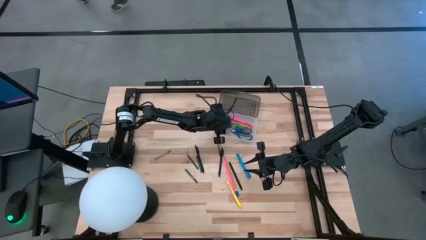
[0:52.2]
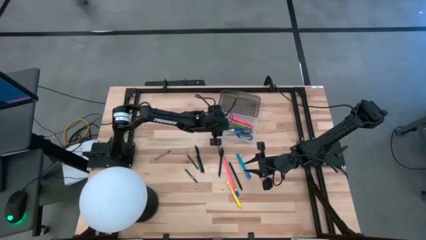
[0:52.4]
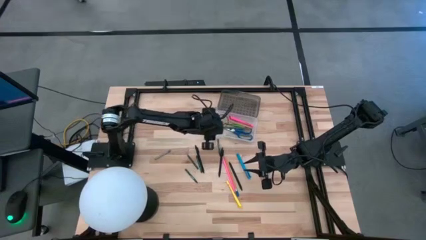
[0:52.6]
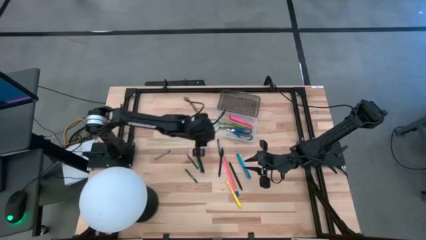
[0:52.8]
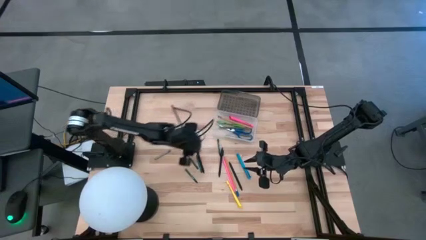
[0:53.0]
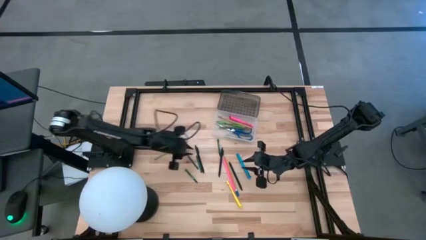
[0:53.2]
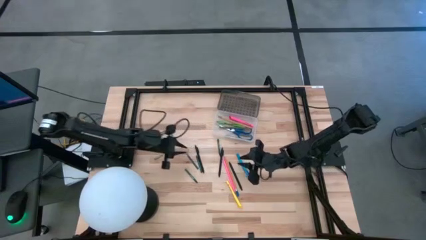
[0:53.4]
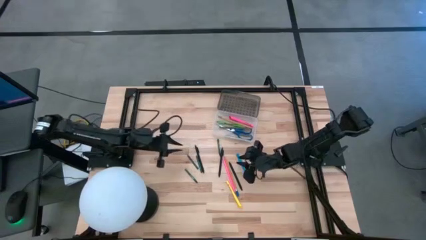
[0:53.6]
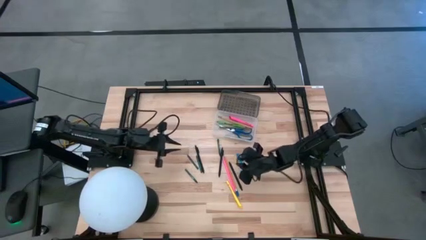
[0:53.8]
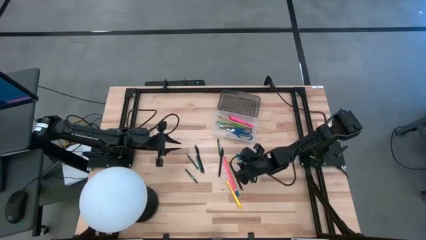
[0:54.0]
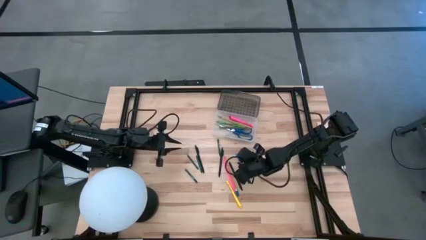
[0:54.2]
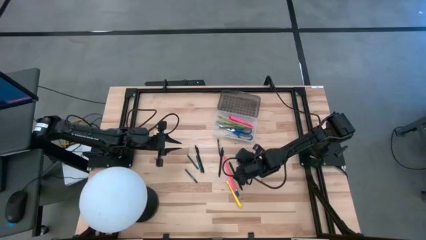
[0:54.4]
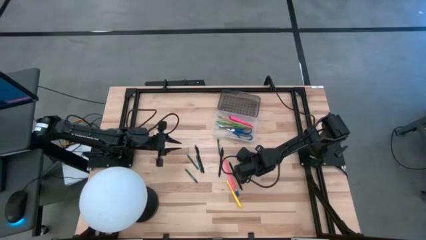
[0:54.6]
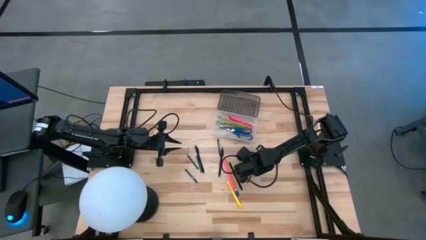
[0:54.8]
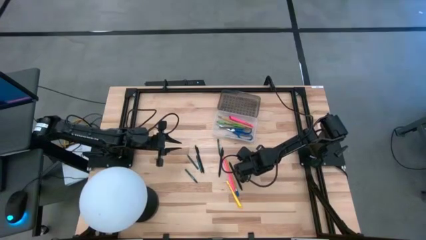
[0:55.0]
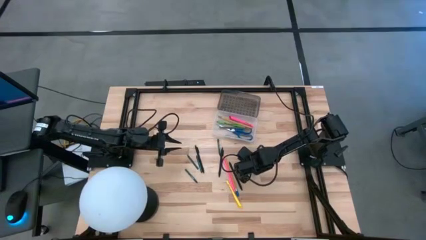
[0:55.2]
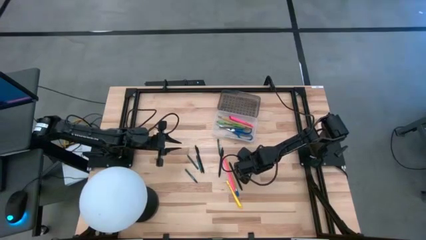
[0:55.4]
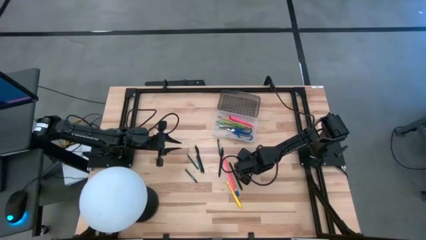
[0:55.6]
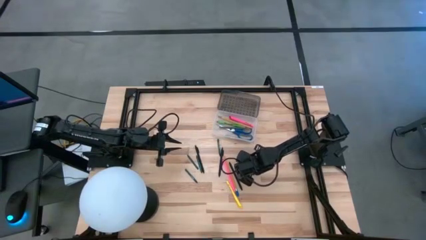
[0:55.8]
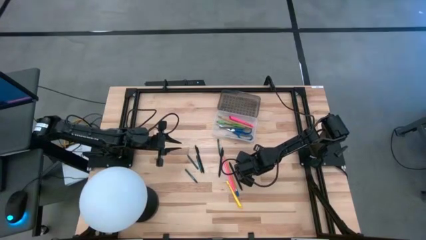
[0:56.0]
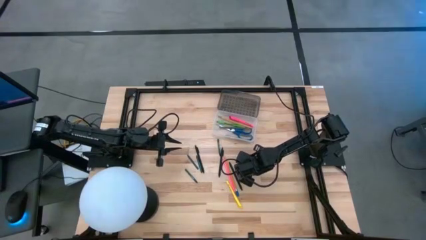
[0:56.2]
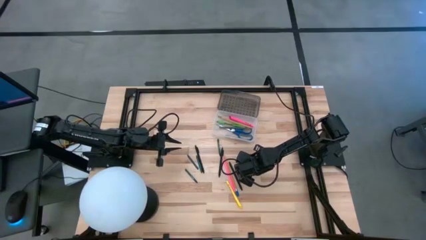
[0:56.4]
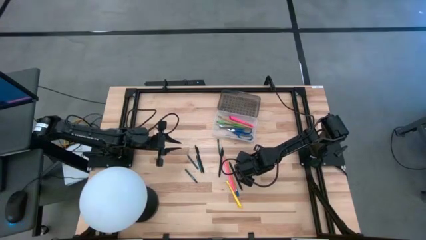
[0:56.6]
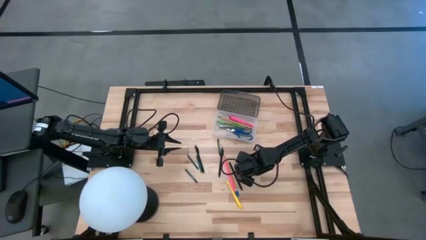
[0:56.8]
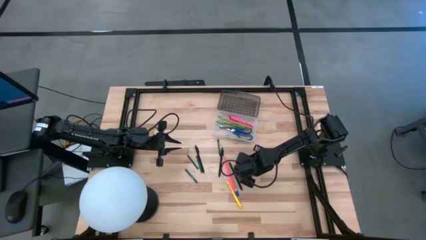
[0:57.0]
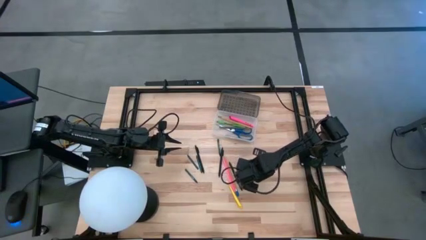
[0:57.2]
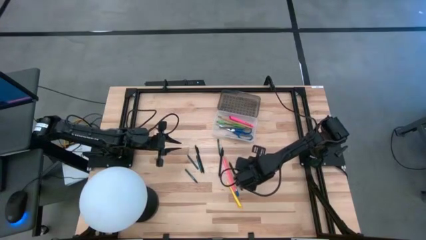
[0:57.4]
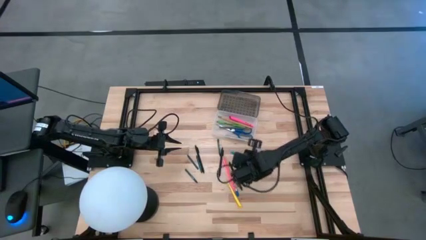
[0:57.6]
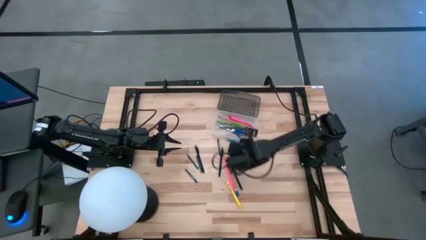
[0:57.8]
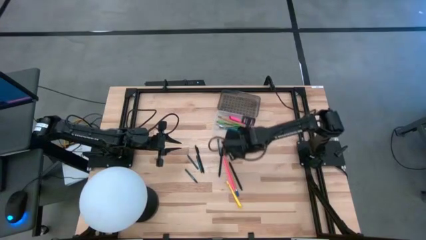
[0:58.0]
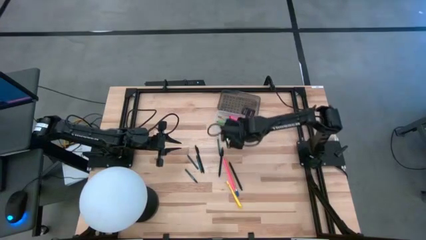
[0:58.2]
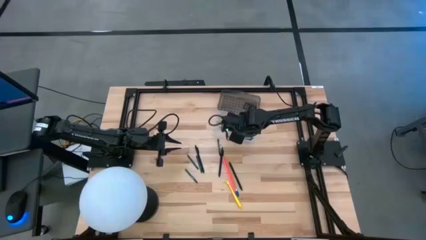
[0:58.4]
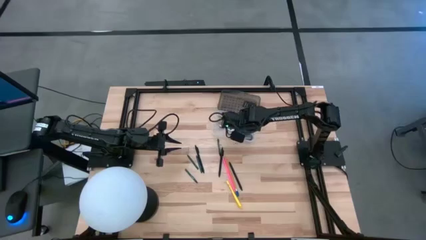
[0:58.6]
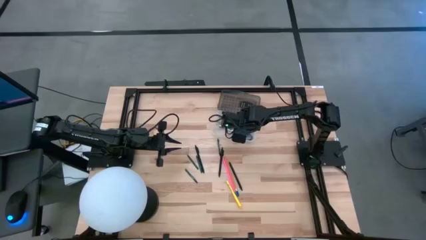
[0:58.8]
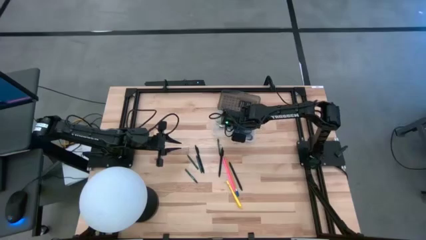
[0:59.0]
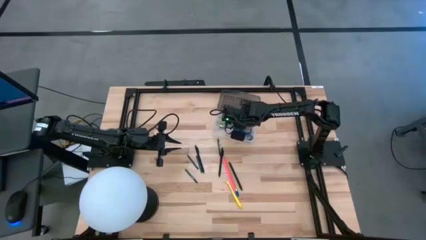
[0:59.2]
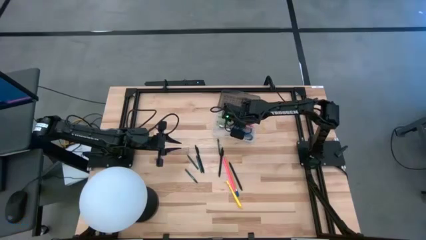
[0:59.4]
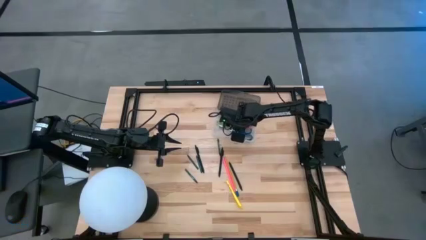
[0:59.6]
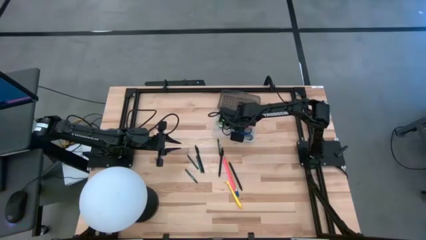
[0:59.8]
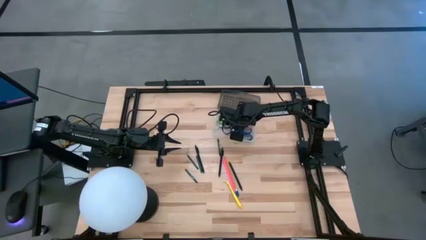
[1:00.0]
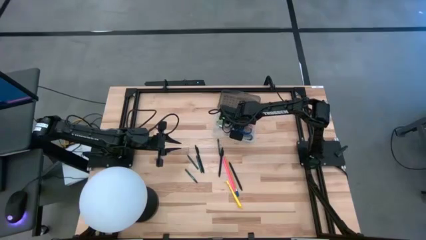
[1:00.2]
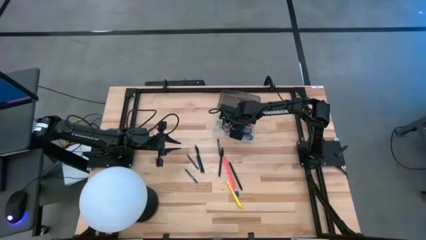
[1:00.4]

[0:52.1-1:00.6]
Task: Pick & place school supplies into a supply box
Put the blue pen into the black supply box

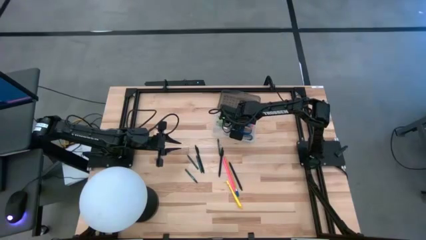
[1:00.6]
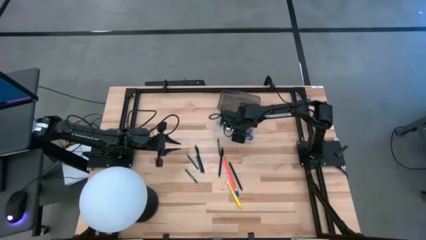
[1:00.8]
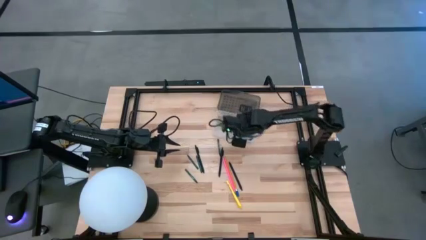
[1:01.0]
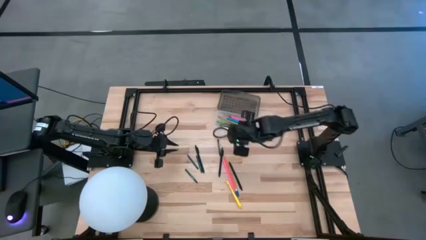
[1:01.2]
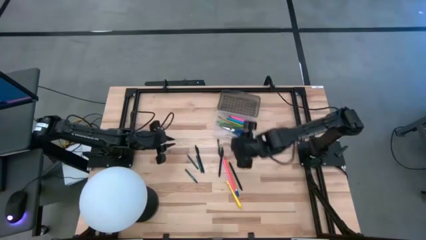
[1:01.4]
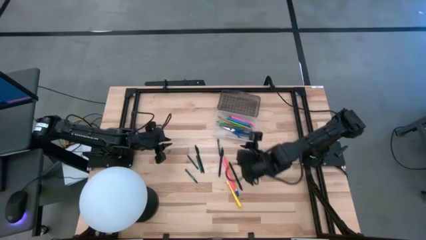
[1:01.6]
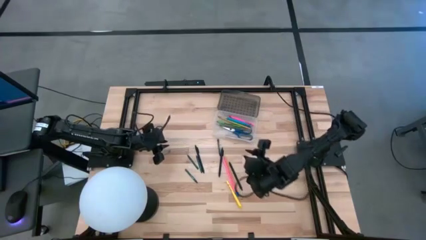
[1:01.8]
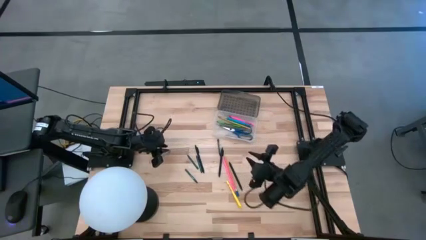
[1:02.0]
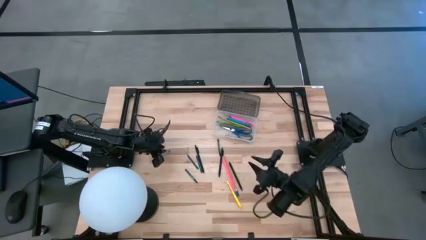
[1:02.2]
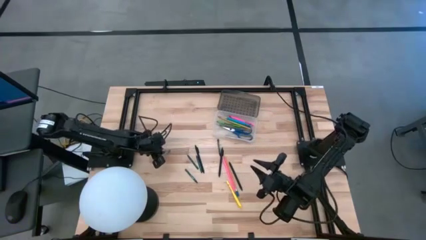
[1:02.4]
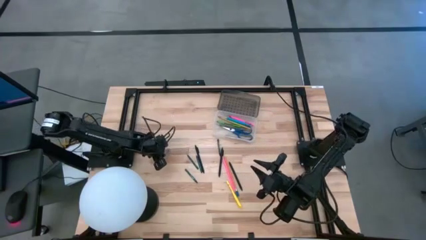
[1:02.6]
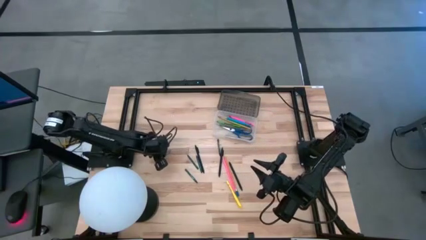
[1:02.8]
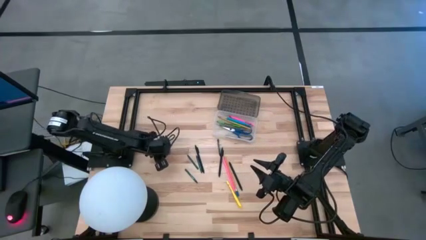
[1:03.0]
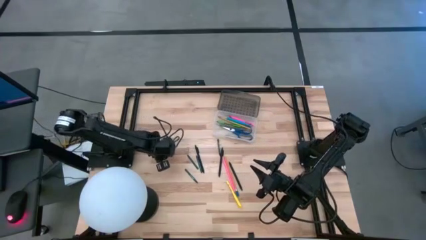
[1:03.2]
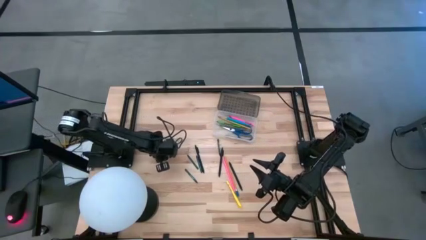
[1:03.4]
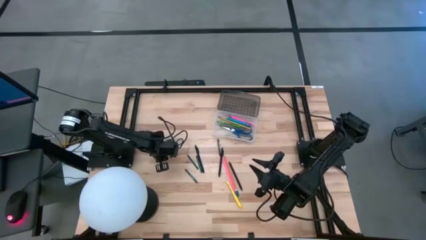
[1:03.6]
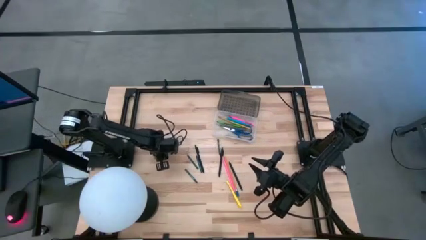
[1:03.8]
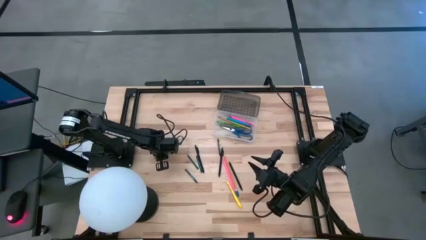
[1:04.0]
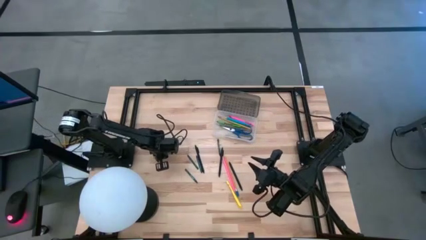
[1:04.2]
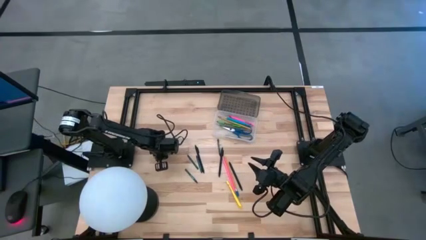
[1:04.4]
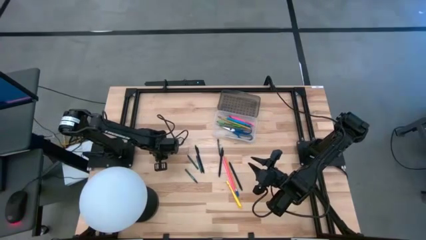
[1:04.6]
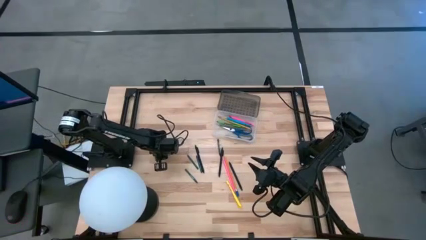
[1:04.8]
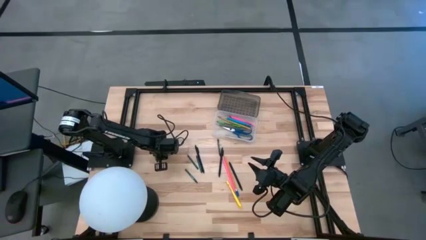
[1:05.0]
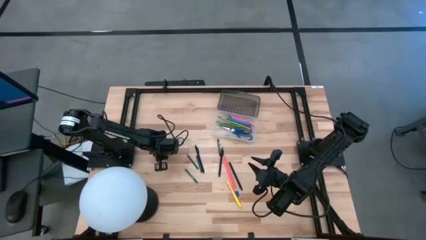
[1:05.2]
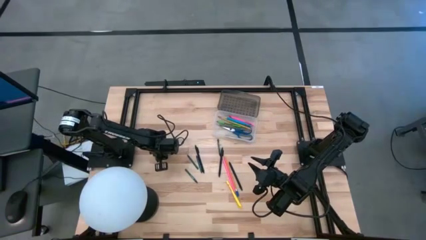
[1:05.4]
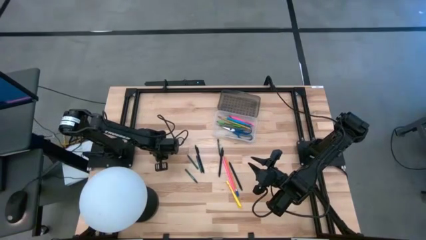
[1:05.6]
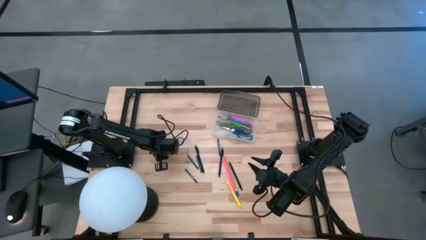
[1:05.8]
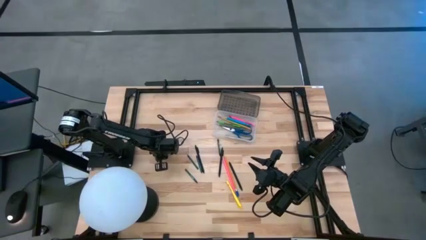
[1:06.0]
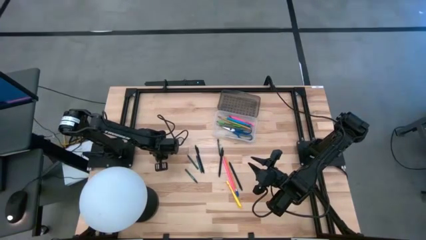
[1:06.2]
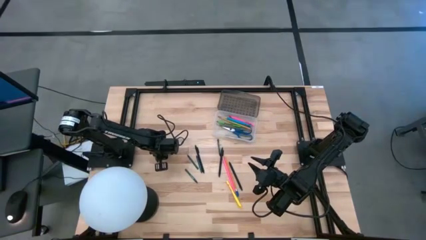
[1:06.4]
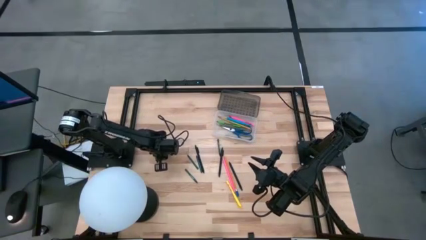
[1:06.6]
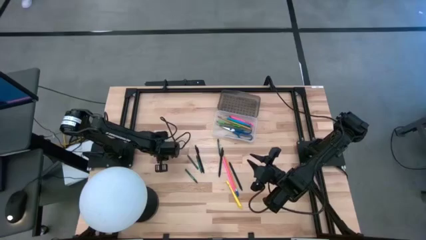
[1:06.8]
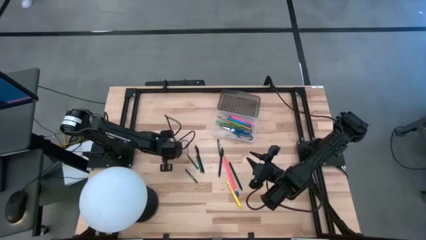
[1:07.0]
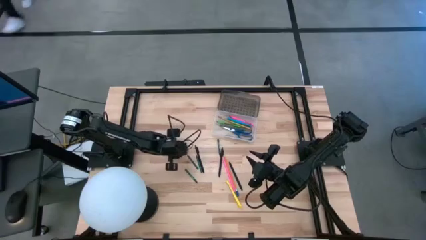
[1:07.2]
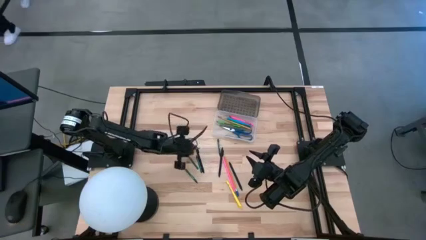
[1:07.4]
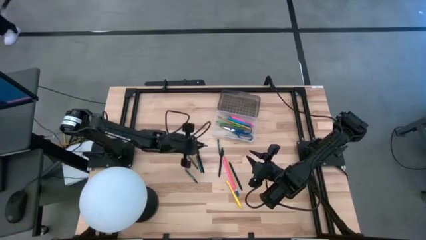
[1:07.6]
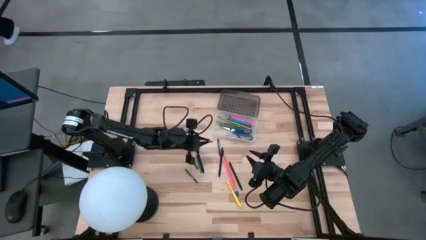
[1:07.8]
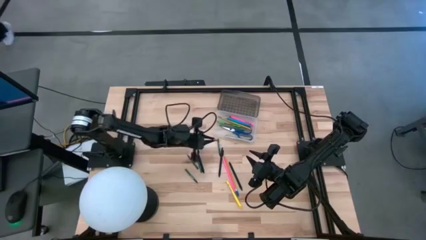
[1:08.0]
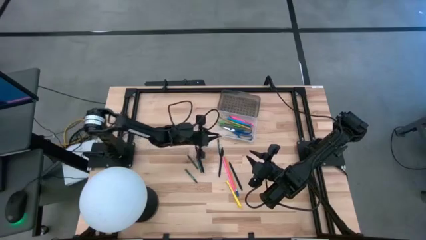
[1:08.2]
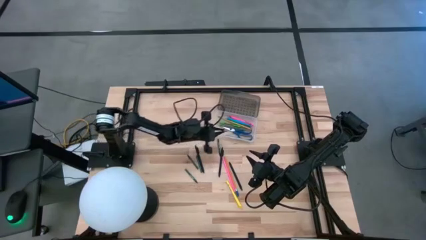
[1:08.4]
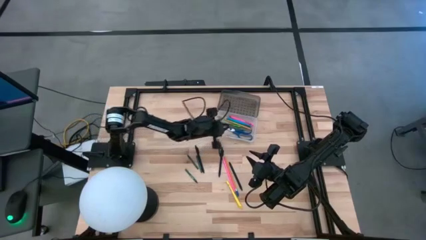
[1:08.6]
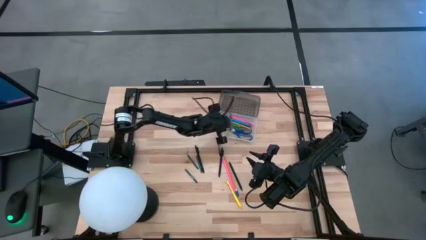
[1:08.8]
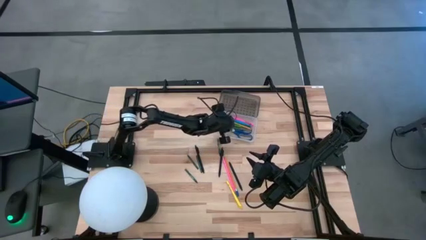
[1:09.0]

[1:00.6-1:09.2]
Put the gray crayon into the black supply box
